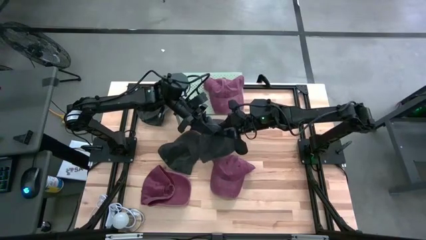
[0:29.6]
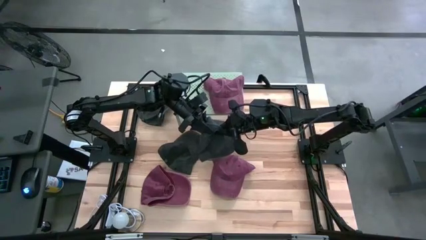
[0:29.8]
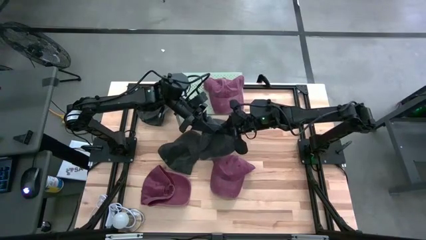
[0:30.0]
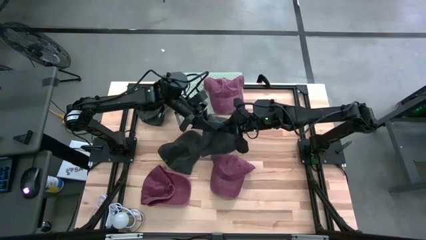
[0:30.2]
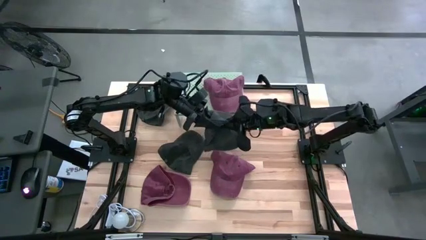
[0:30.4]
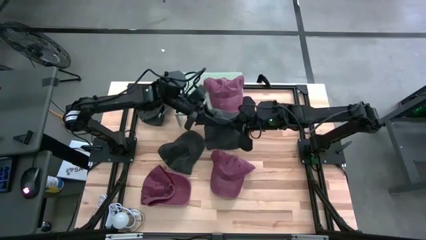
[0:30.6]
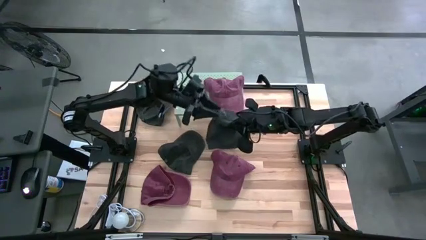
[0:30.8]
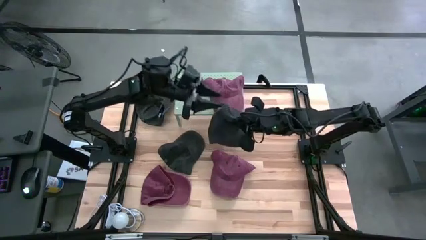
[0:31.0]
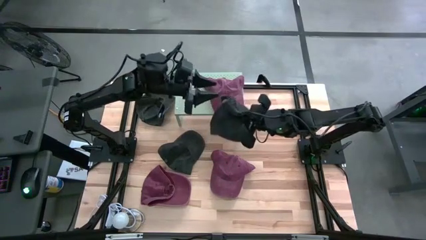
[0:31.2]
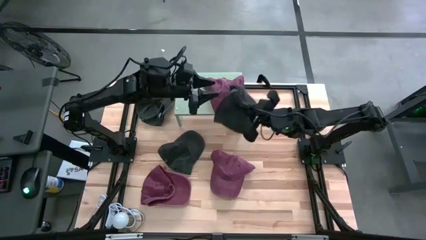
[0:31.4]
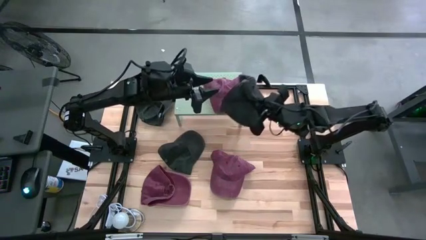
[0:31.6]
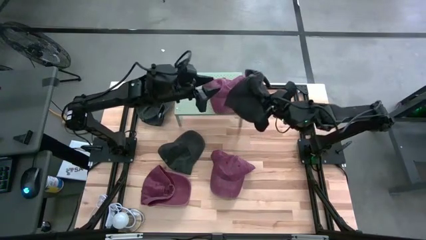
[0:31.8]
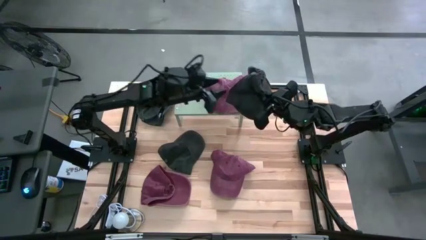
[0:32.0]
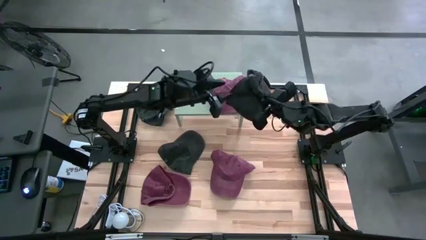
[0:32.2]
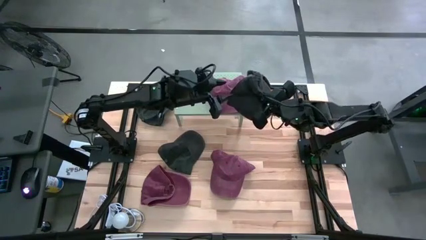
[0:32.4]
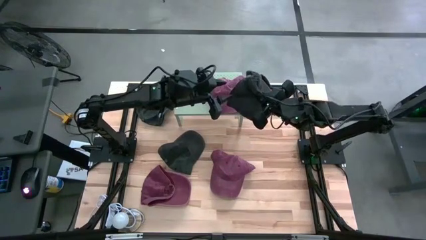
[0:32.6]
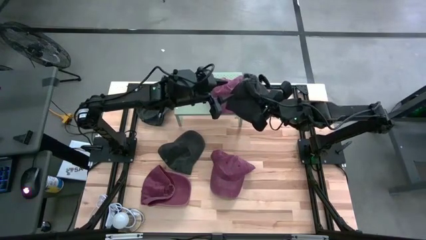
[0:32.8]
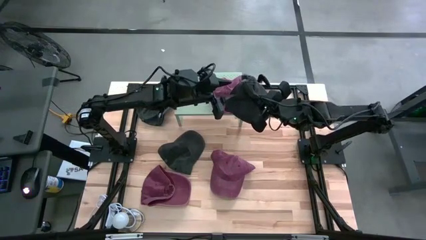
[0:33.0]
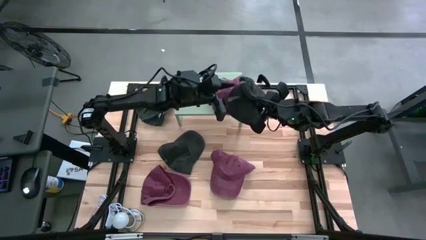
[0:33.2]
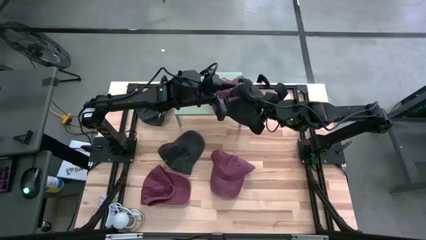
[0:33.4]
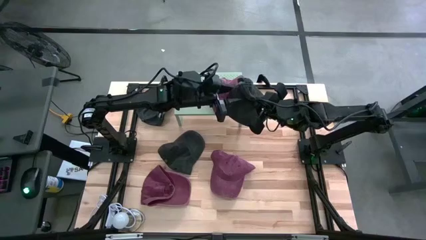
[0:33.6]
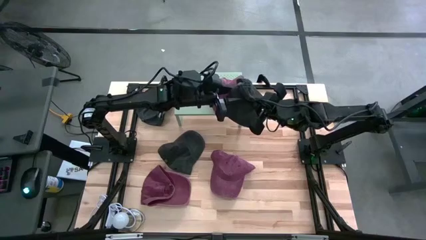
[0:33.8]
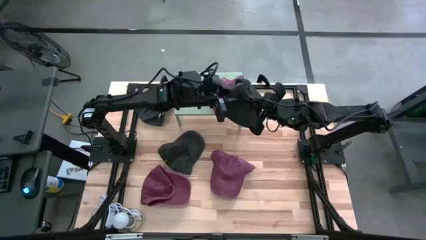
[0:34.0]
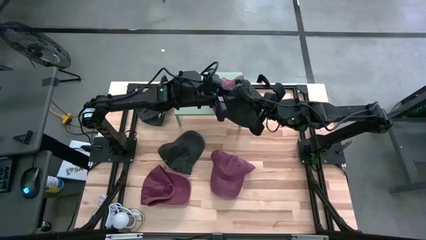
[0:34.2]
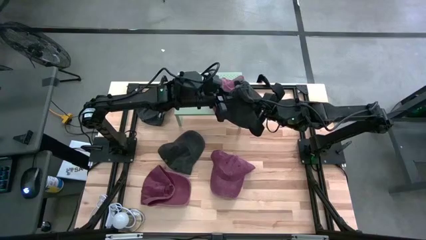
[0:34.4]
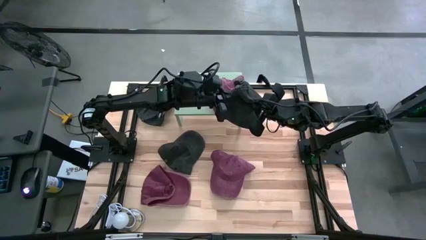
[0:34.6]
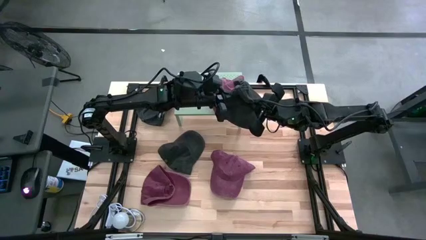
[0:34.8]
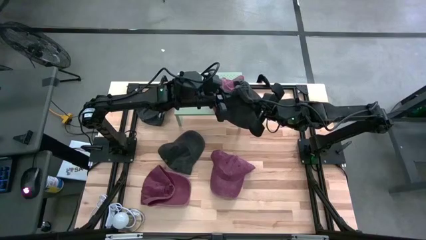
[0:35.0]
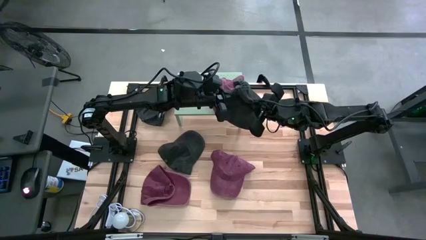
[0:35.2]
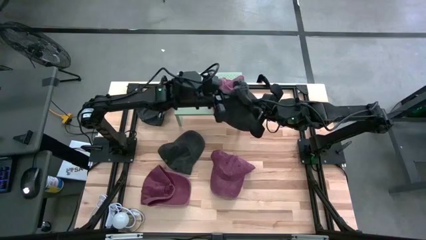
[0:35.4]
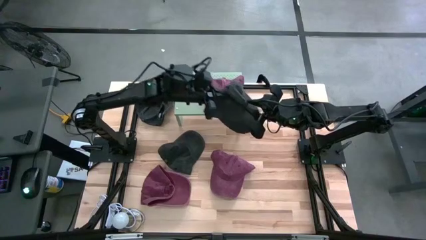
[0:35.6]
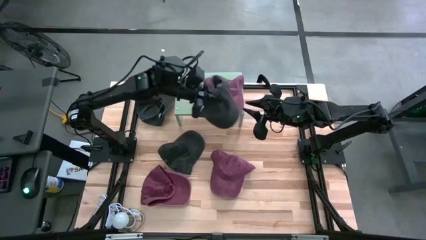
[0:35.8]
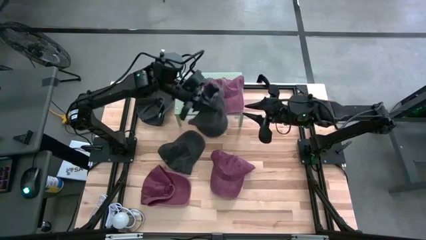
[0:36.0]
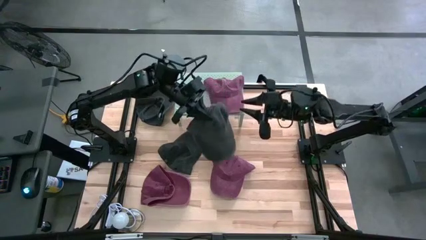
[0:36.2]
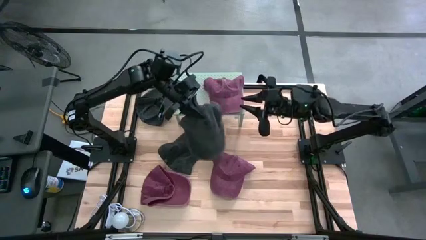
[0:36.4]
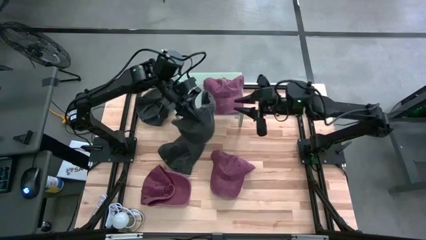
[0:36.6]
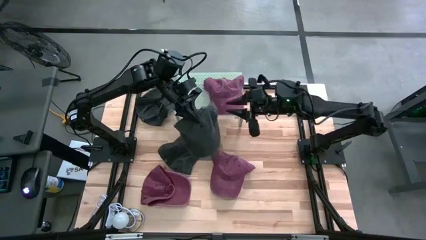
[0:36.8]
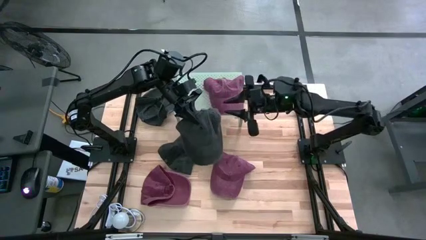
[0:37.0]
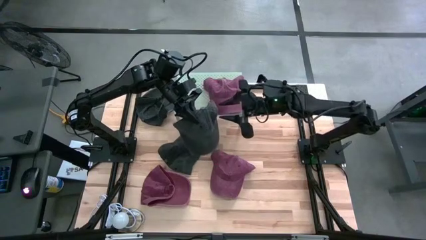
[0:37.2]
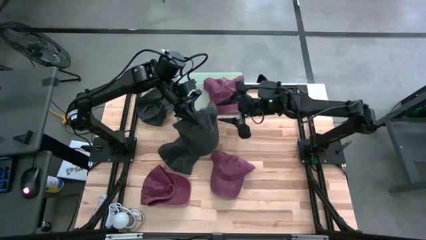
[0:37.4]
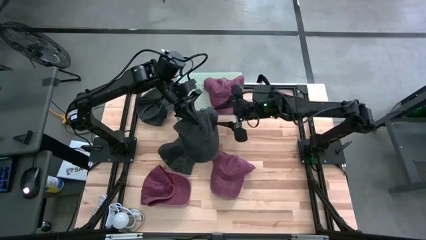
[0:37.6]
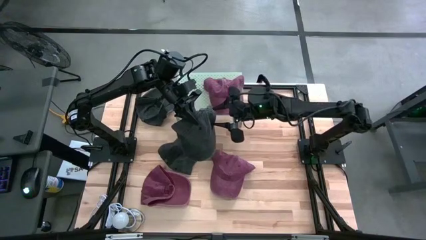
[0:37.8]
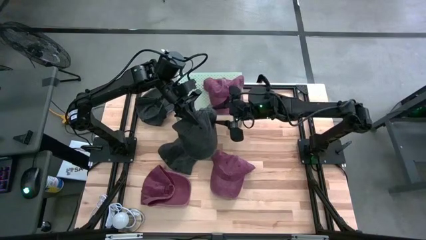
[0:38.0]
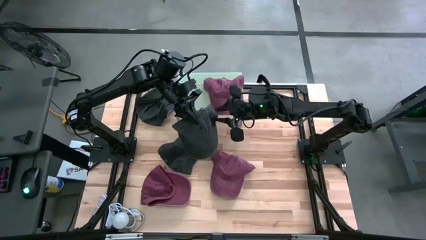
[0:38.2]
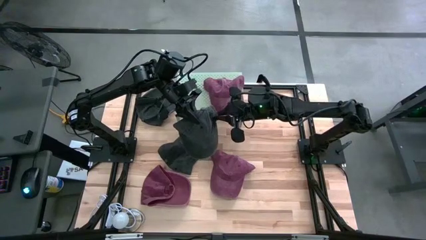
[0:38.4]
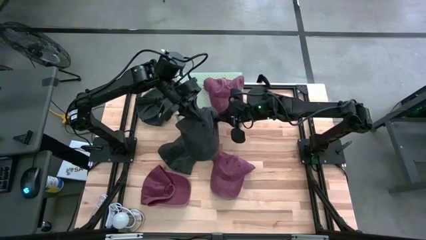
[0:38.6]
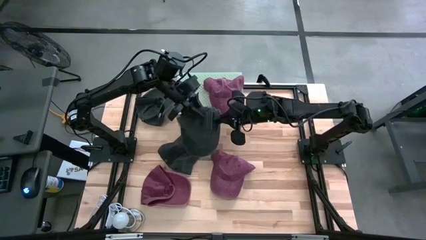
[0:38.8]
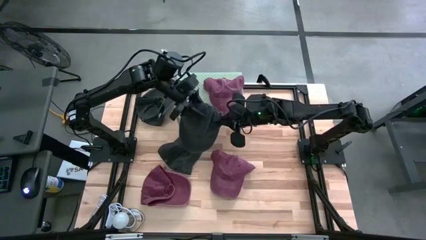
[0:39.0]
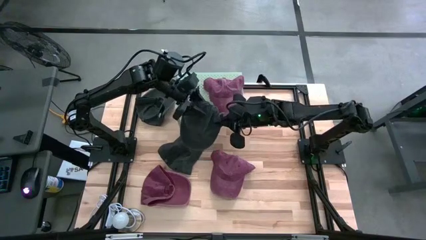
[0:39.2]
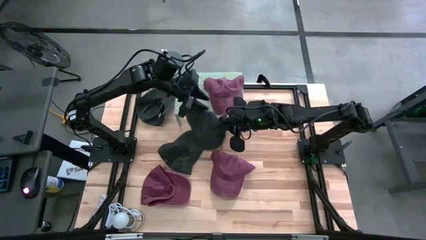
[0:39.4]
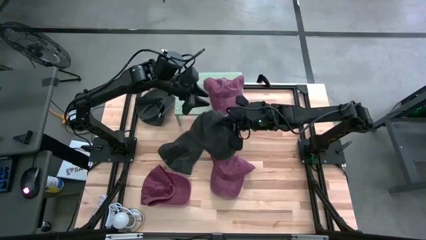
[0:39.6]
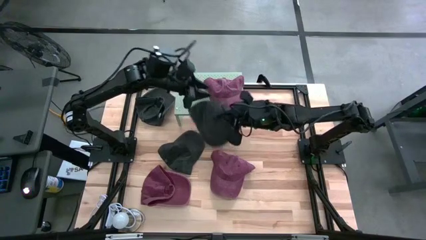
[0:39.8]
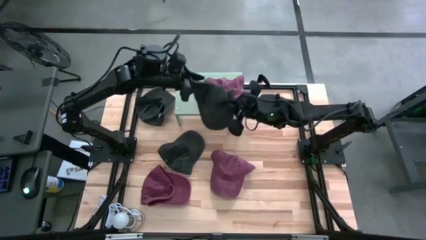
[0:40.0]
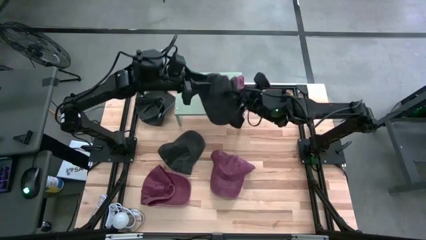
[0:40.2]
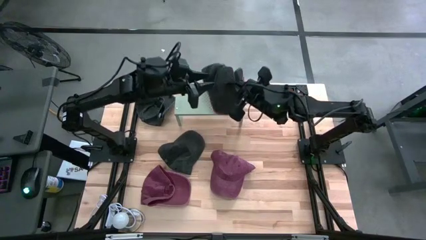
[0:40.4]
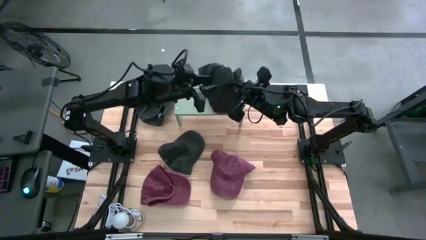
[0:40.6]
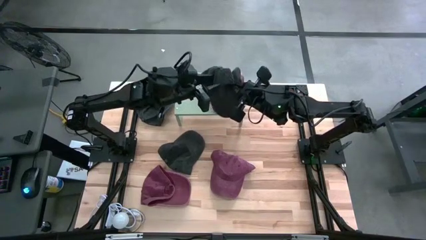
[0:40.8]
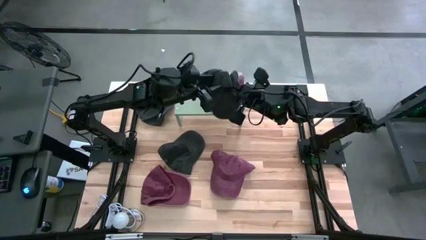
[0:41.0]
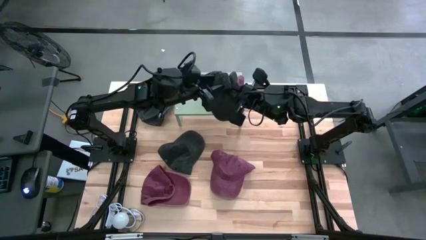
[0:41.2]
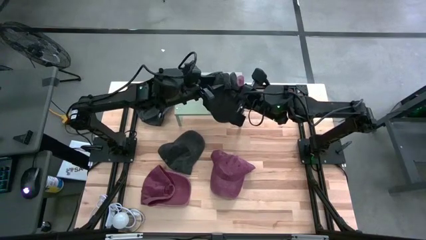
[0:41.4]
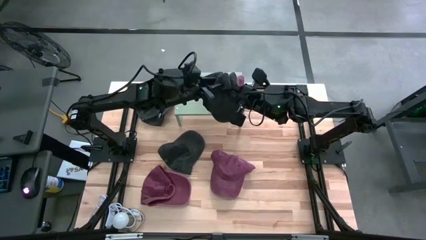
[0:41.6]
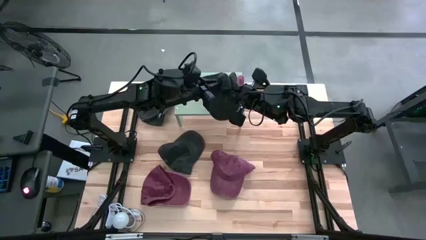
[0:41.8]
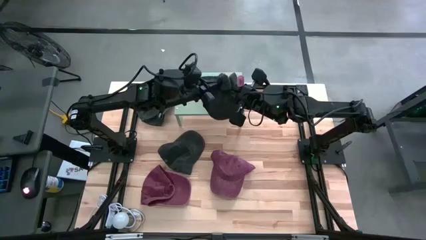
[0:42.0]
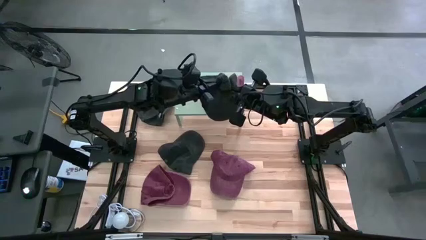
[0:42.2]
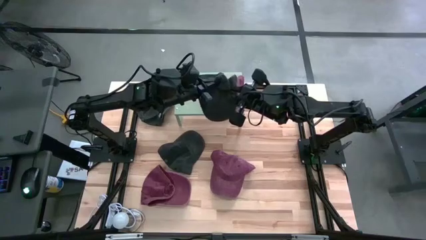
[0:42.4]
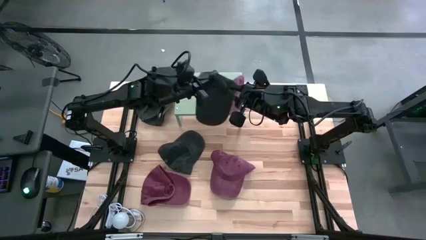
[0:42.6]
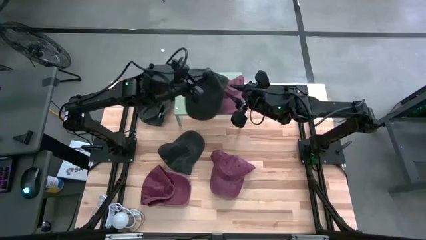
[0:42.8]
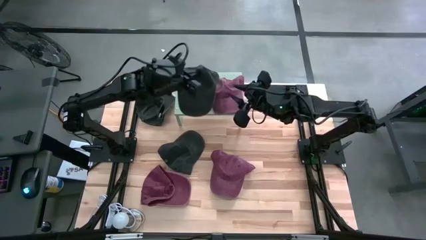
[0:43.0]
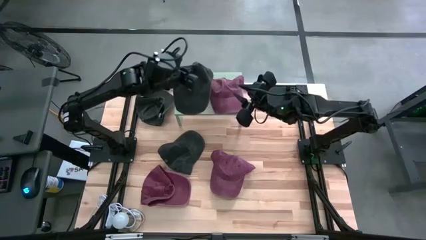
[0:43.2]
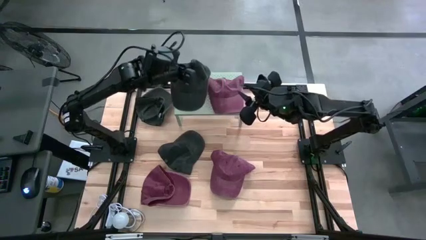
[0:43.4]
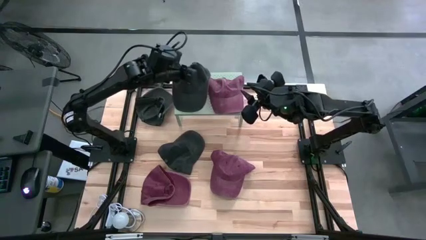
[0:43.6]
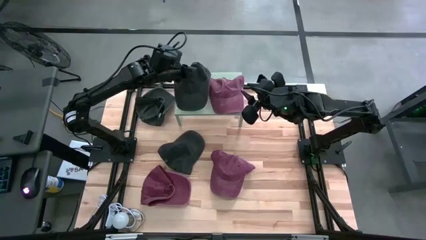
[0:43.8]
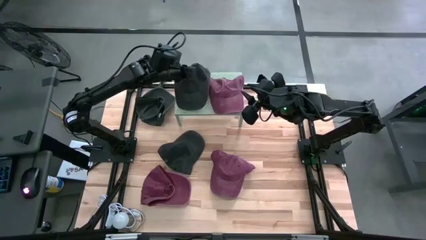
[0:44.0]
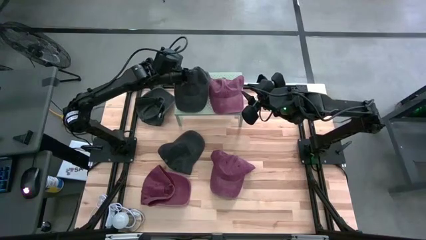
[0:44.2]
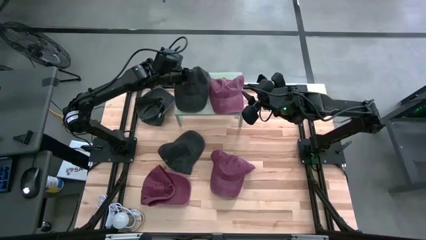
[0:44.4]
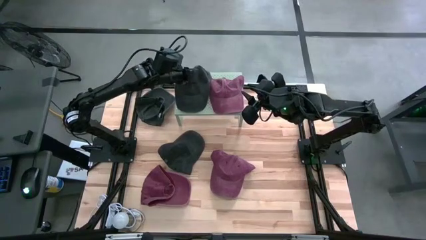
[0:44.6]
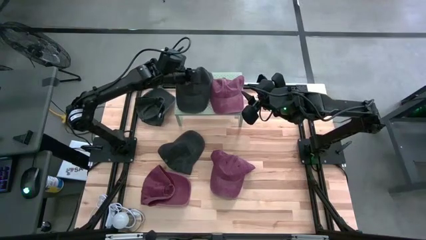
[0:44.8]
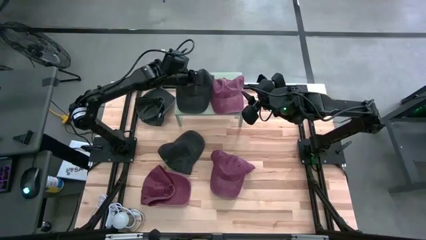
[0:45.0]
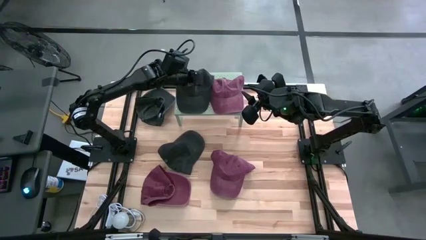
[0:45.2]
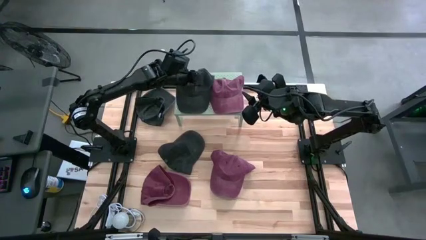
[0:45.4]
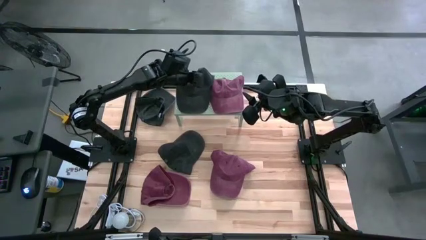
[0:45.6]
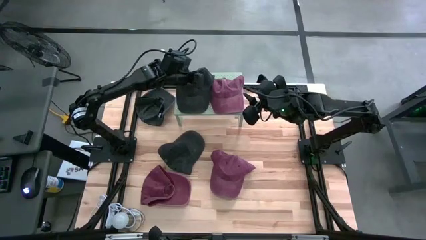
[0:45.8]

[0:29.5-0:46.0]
Task: Pick & Place hat
Put the right black cap on the shelf

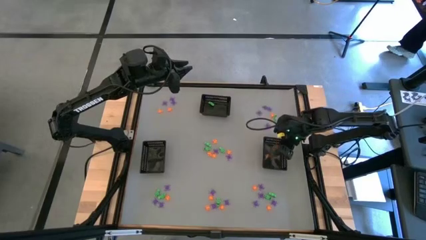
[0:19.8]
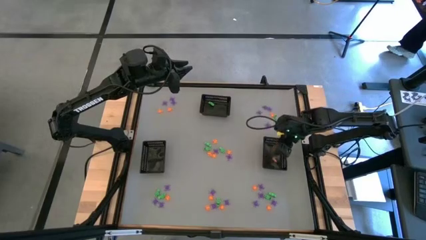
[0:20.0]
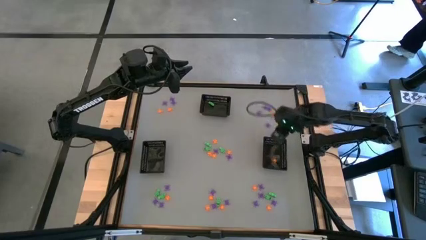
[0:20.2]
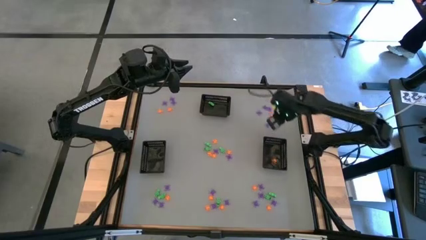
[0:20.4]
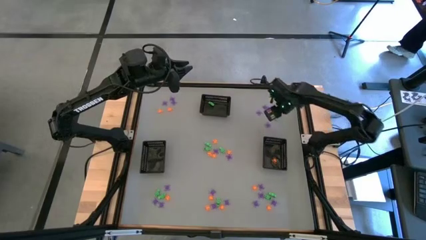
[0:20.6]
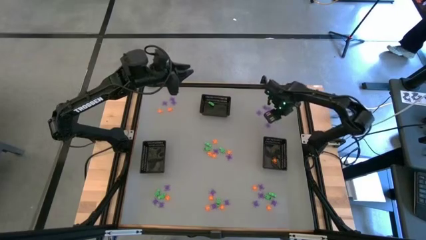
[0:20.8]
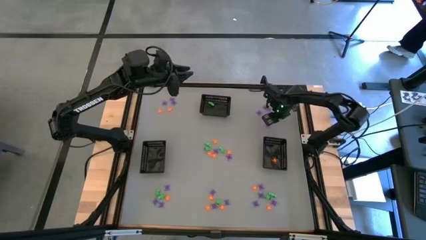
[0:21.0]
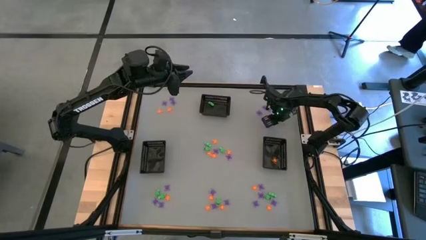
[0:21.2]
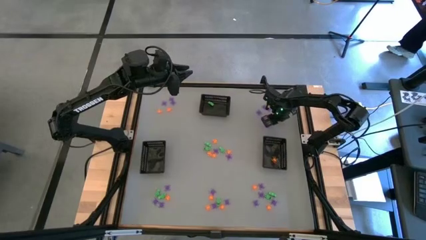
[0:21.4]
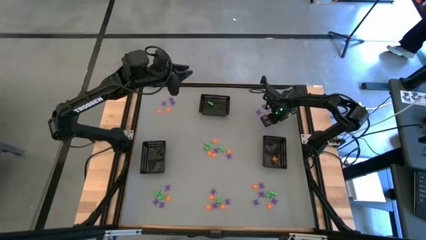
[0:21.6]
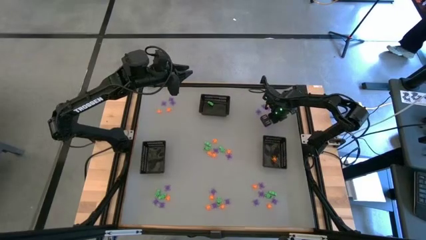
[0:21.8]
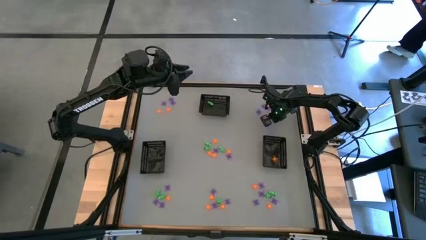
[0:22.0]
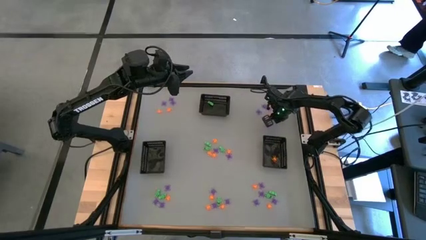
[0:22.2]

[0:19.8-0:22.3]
Task: Sort Halloween decoration
Put the green skeleton toy into the top bin
